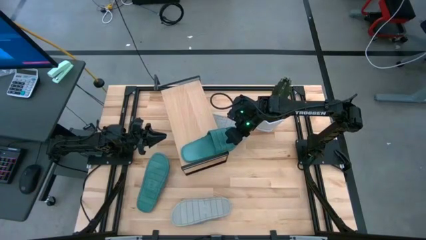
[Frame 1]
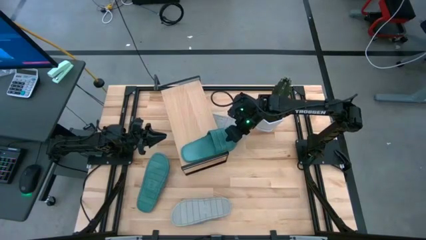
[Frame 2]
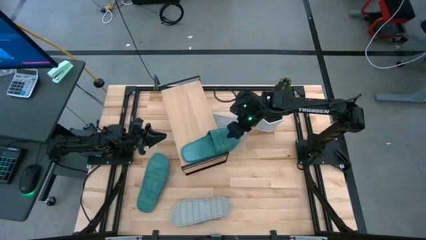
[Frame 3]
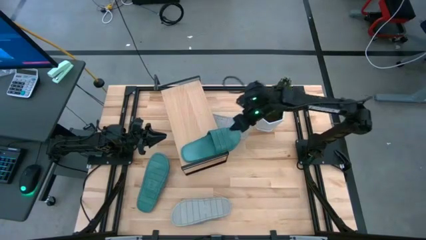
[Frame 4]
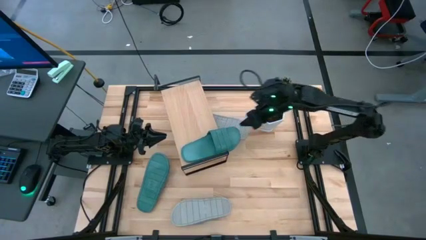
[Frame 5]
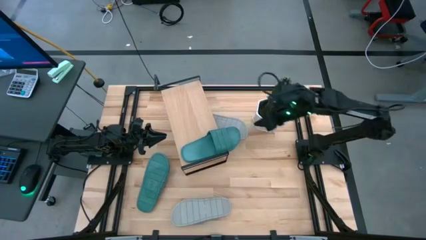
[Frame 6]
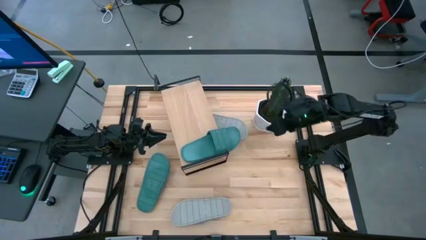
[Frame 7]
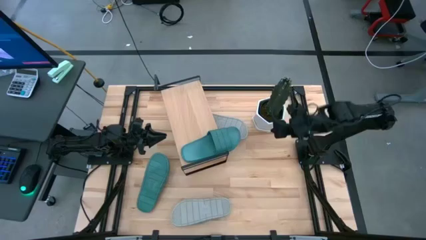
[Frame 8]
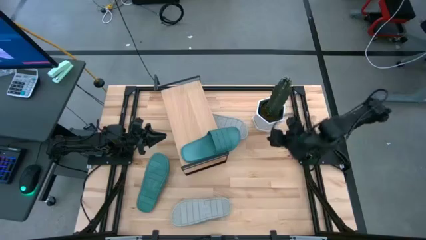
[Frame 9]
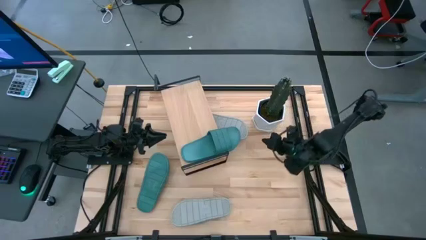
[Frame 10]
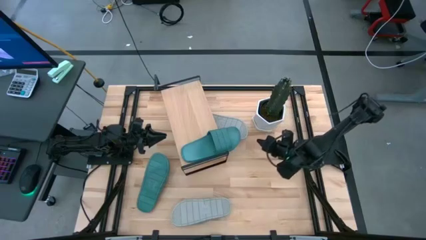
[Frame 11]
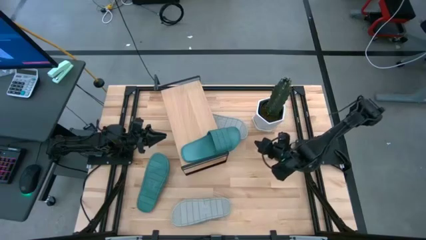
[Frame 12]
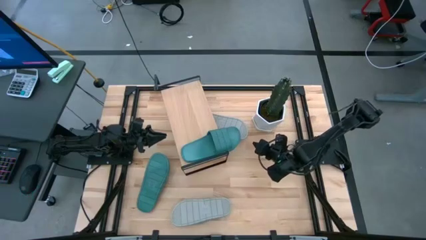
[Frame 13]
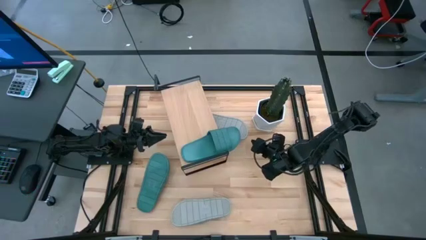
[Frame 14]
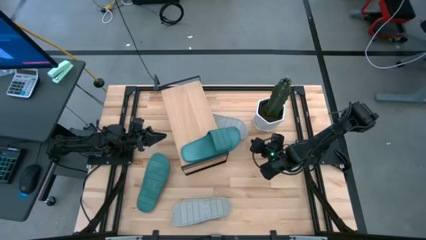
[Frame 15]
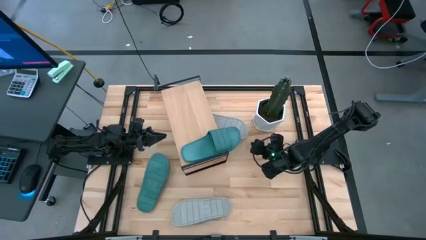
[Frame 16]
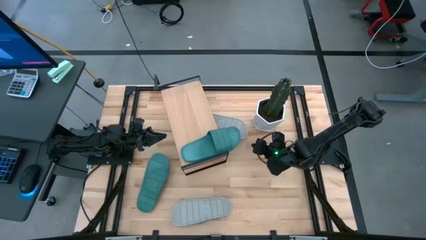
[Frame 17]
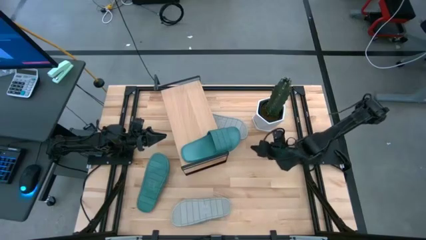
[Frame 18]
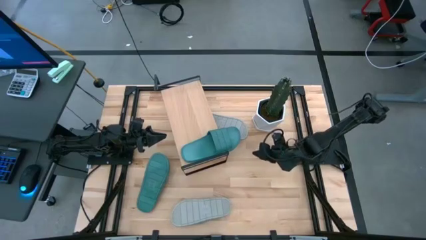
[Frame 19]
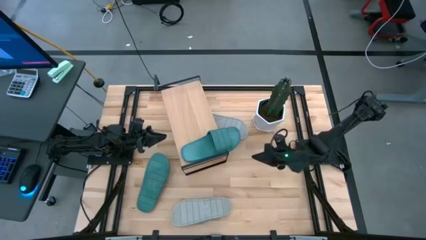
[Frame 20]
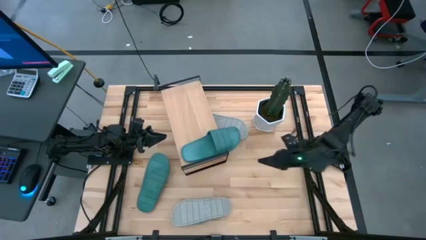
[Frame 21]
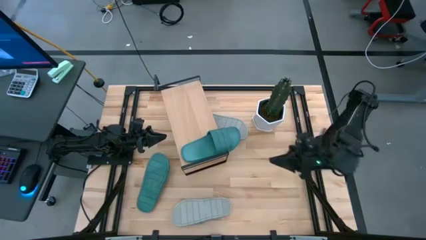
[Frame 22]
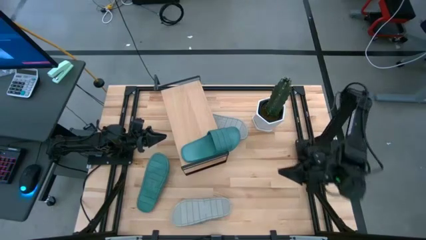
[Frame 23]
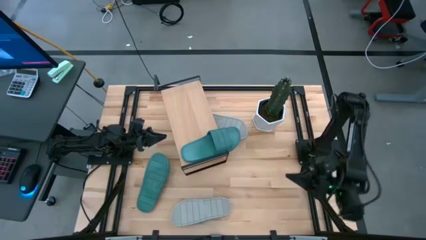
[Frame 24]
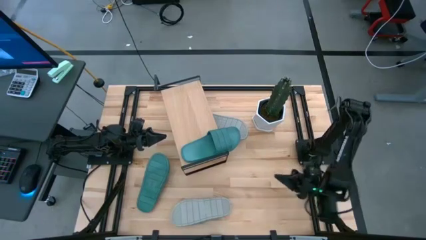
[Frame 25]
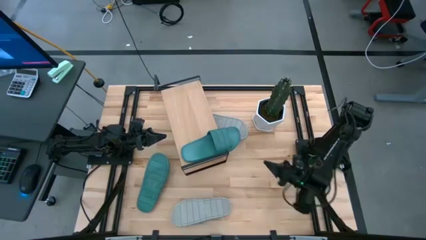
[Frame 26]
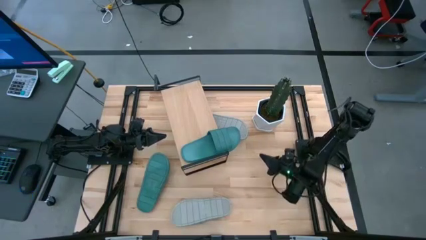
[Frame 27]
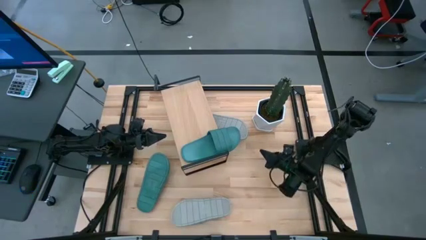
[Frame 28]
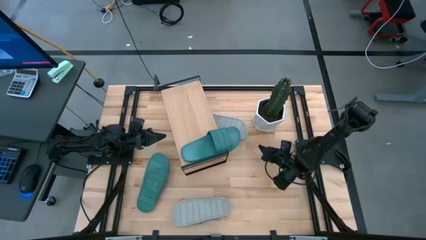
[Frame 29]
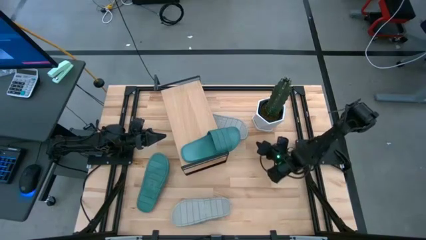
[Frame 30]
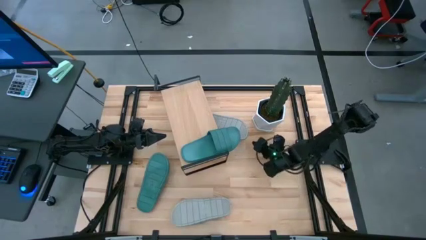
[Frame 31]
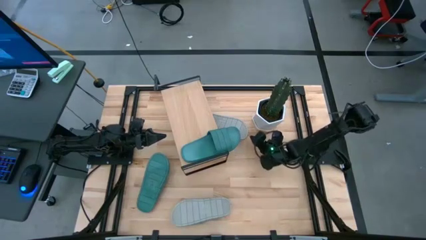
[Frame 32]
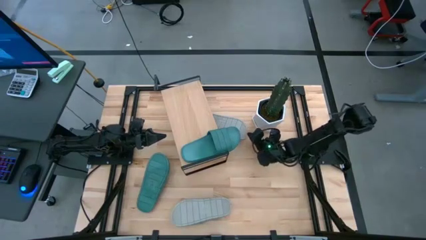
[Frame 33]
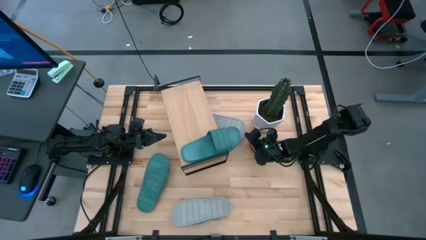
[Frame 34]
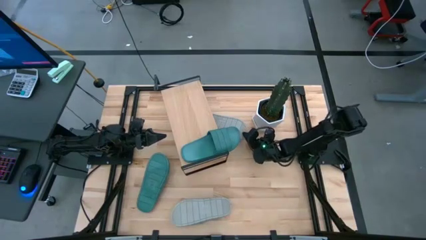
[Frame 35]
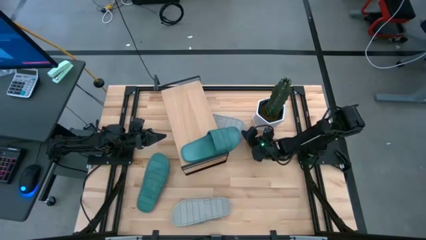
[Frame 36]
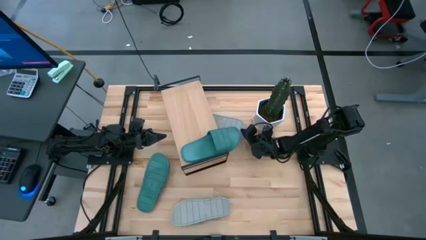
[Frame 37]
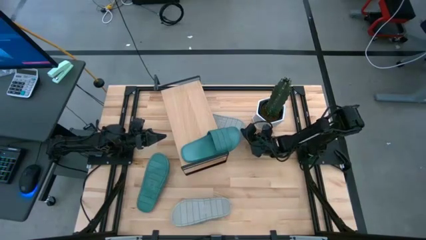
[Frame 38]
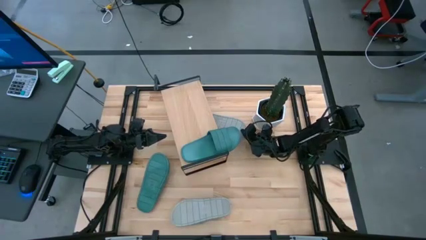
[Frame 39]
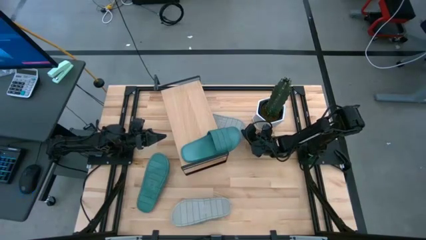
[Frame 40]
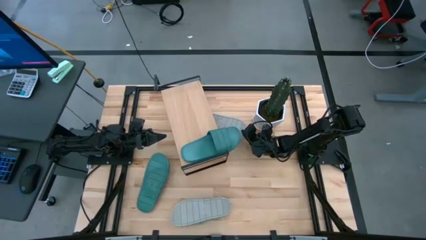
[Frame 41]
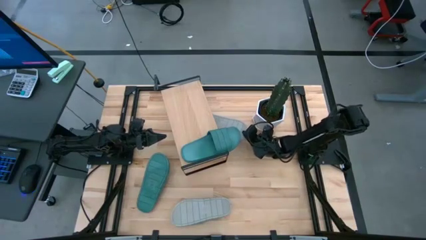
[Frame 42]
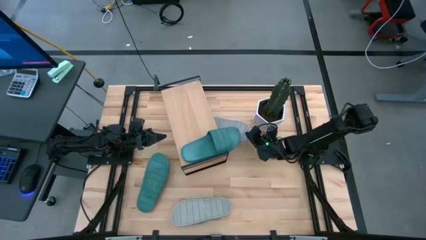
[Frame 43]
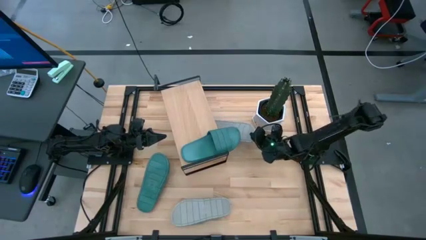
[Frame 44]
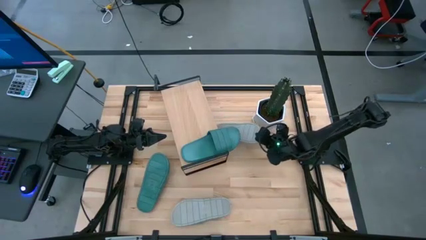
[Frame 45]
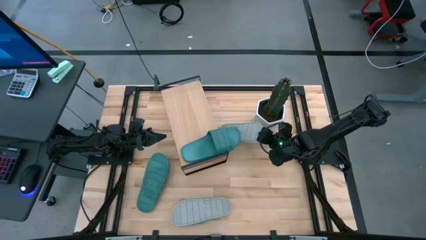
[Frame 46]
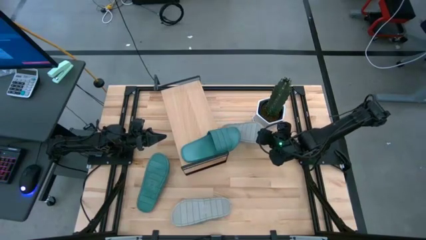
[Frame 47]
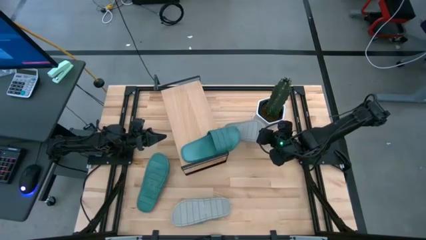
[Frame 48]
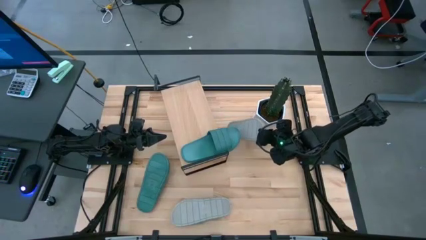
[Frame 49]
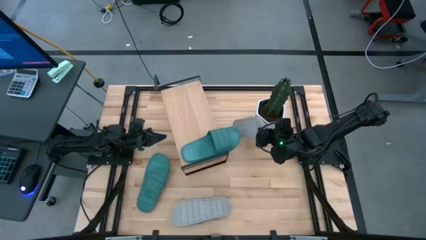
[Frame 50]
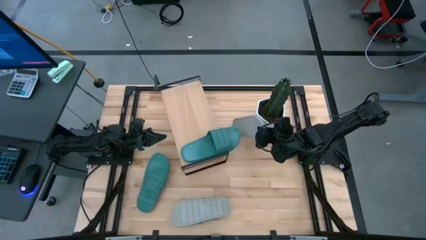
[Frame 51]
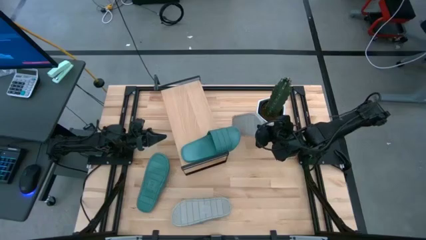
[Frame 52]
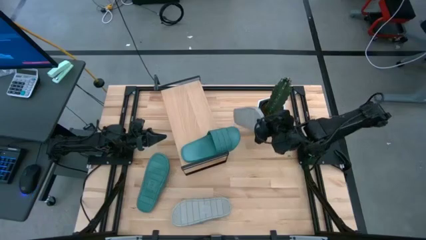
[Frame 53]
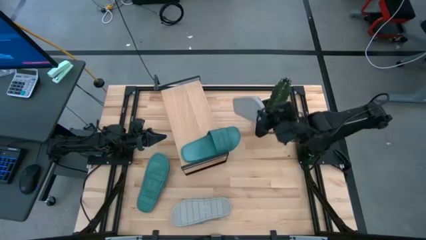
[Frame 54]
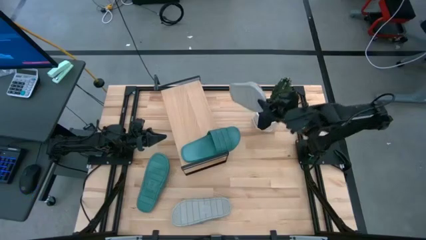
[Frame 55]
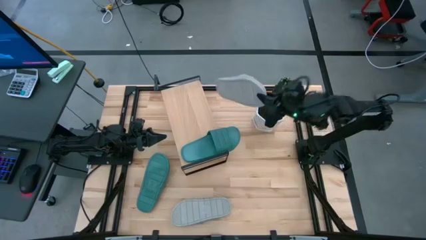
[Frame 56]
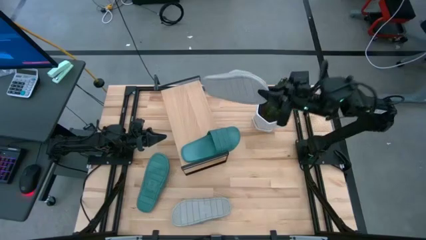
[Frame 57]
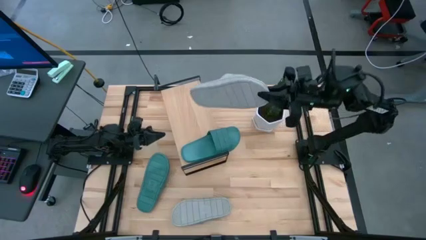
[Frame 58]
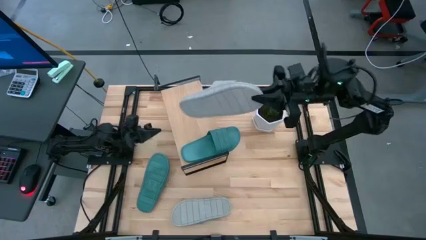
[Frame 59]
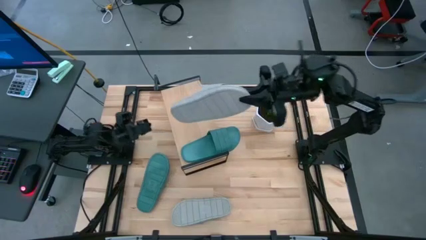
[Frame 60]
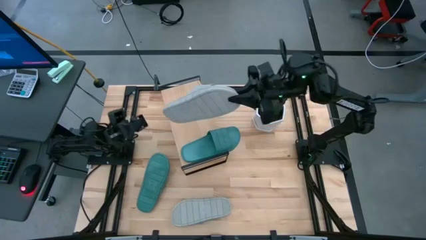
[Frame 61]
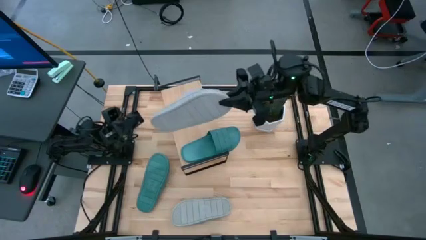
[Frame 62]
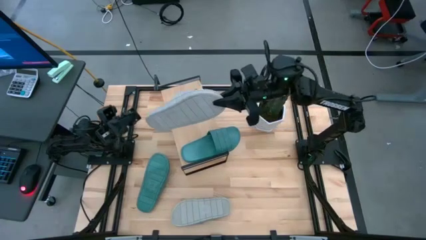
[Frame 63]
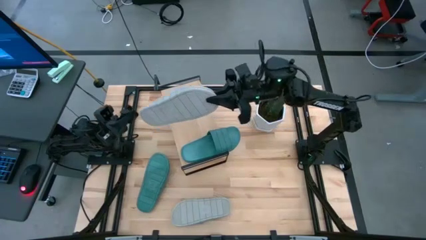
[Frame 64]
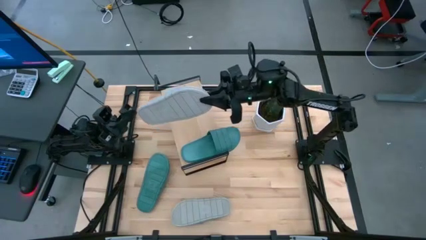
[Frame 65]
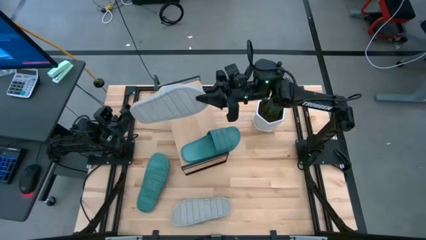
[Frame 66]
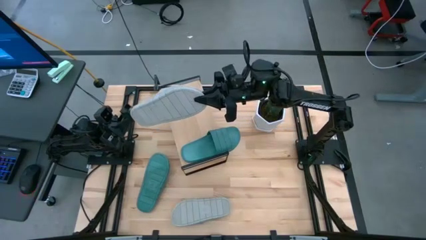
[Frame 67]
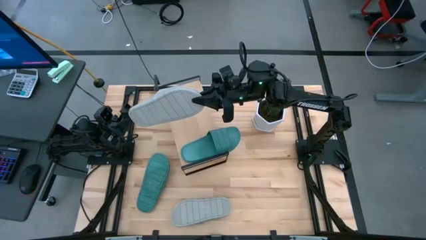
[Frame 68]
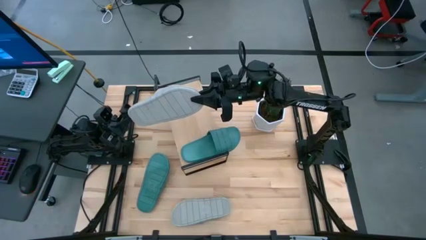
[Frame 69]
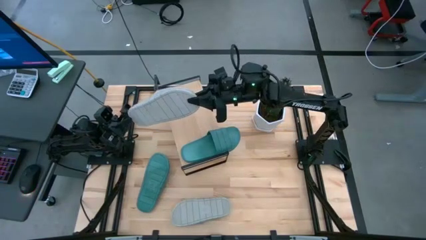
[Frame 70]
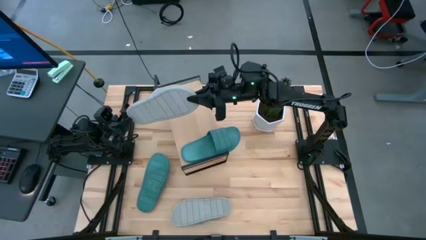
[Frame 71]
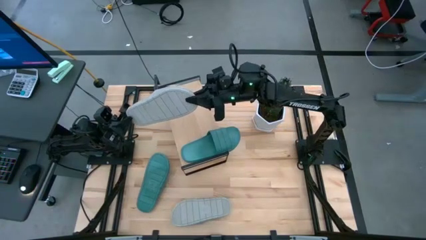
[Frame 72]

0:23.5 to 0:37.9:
Task: Pick and place slides into the shelf
Put the top white slipper on the shelf

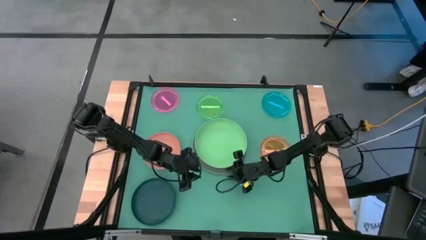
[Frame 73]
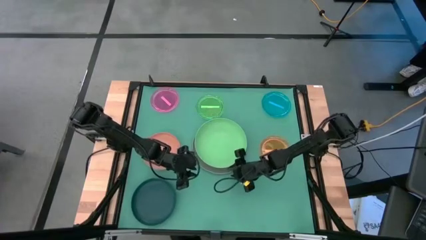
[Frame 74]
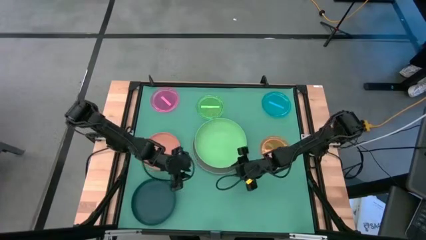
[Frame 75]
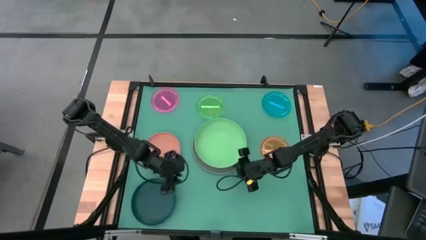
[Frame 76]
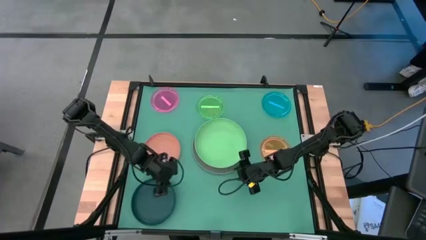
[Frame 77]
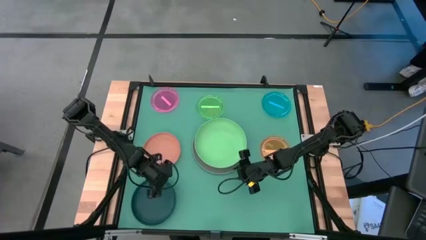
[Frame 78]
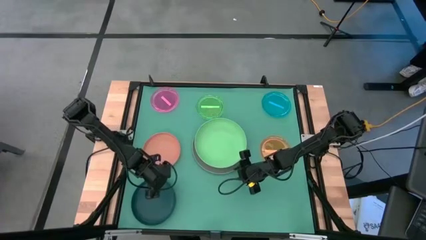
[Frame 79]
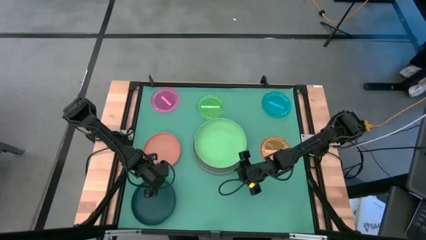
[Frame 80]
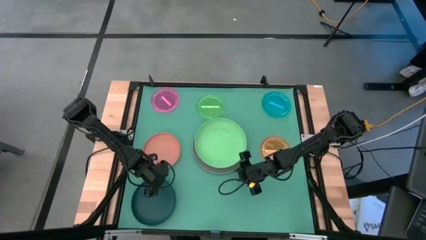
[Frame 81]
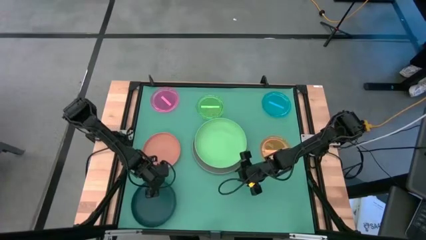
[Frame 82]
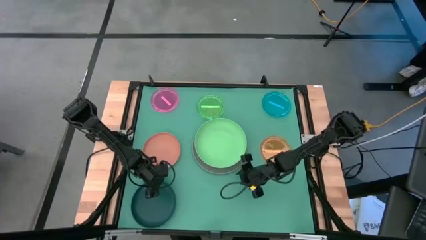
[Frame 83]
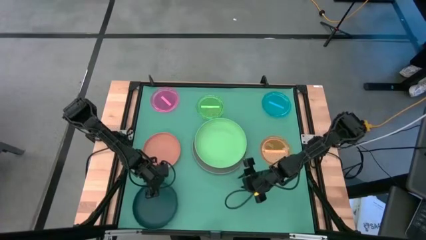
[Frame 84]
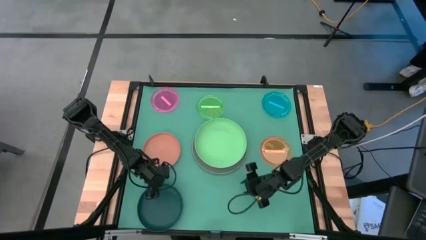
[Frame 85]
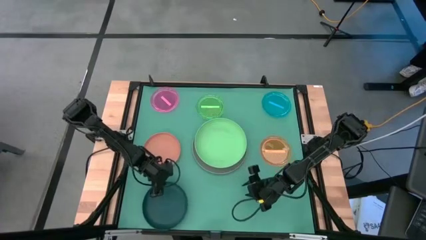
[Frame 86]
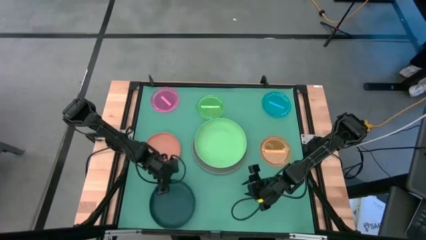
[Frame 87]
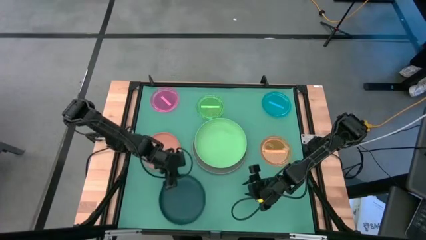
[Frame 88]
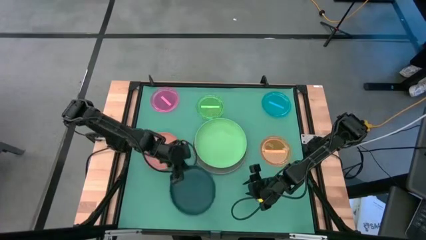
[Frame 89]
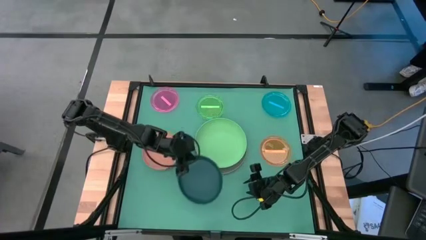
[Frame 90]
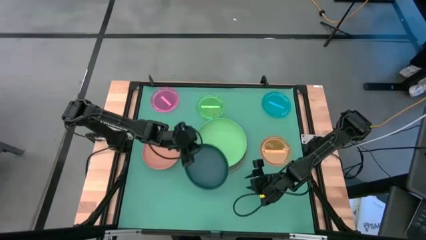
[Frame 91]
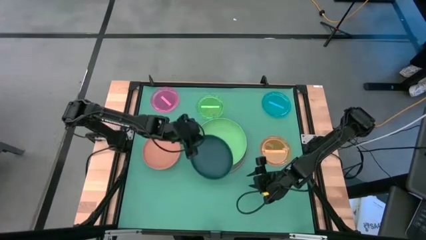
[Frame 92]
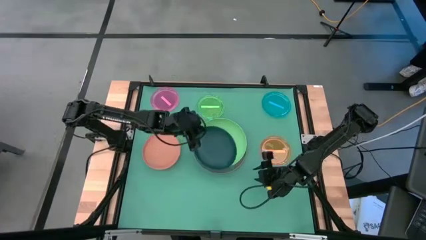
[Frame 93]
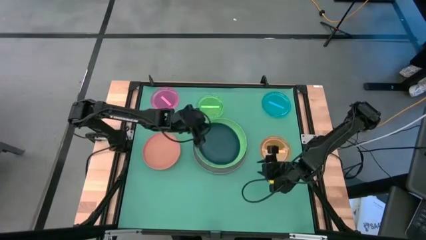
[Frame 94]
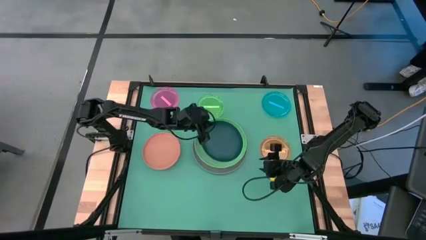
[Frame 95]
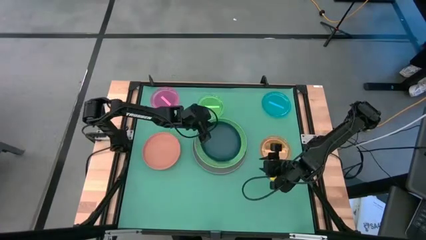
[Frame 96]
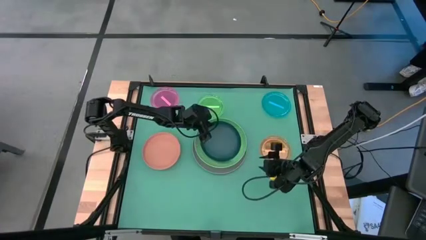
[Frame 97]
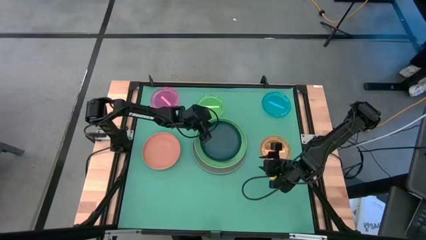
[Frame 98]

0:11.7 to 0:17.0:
Task: Stack plastic plates
Stack the dark blue plate on top of the light green plate
